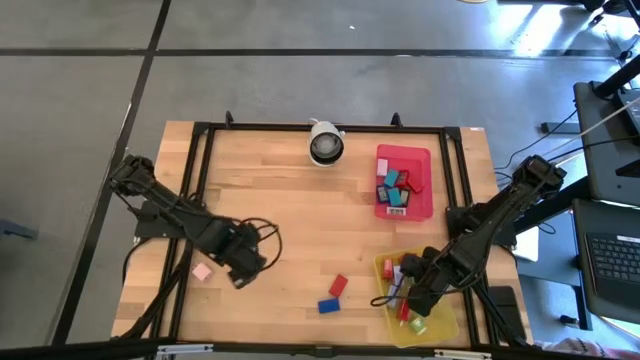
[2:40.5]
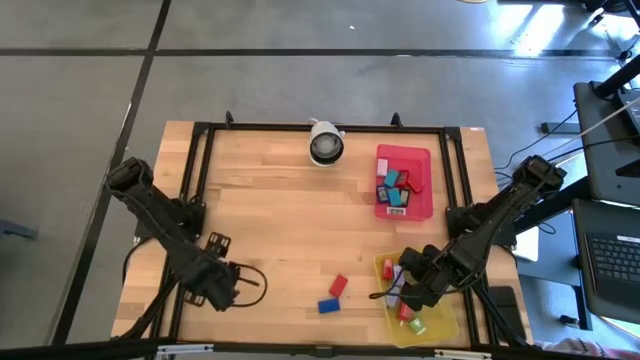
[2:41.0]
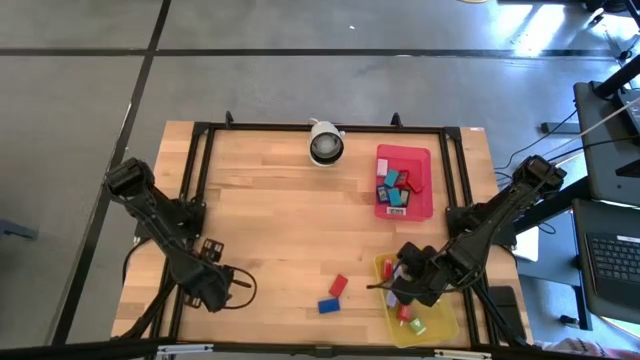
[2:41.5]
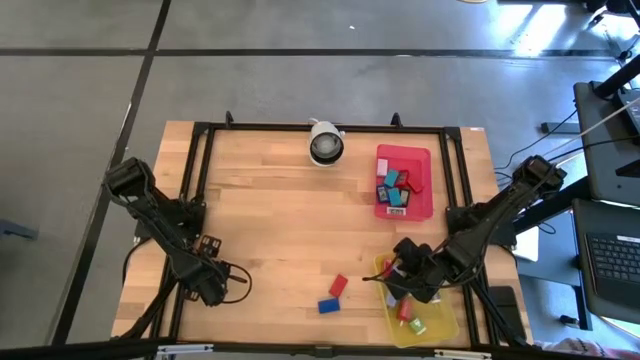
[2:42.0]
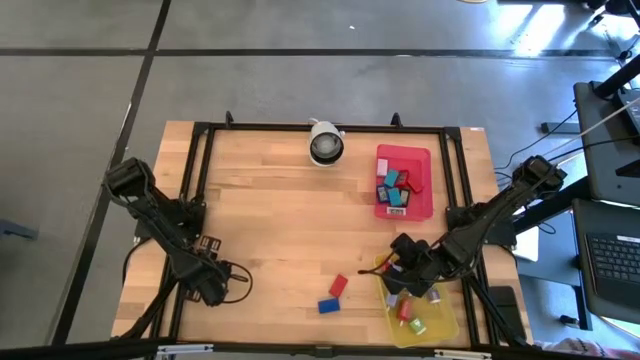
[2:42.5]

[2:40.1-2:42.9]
Task: Pick & Place Office items
Put the white charger adapter into the yellow bin

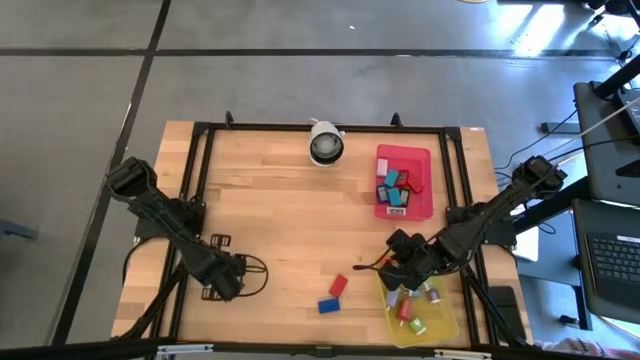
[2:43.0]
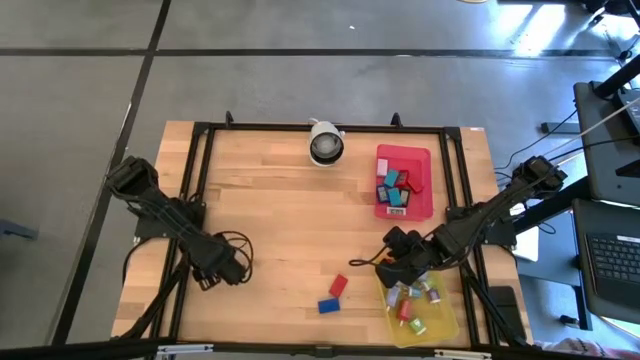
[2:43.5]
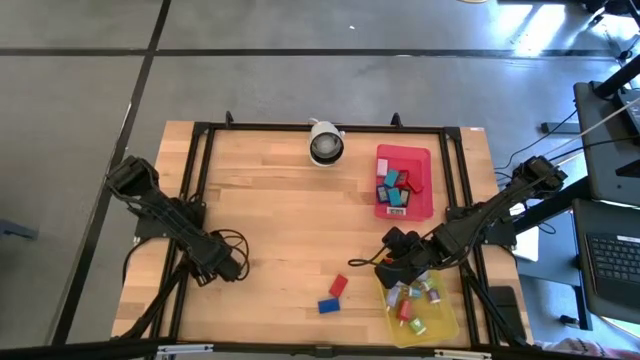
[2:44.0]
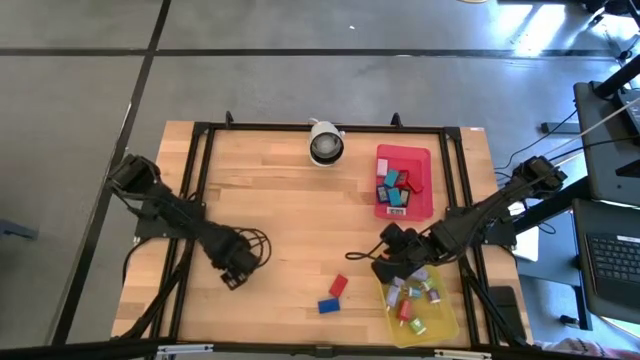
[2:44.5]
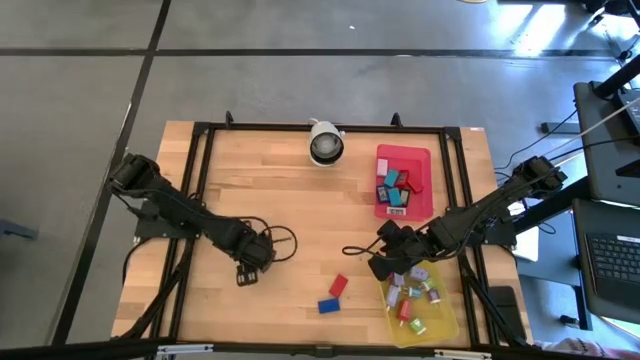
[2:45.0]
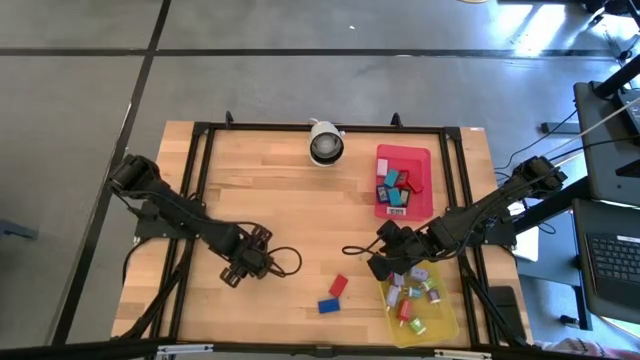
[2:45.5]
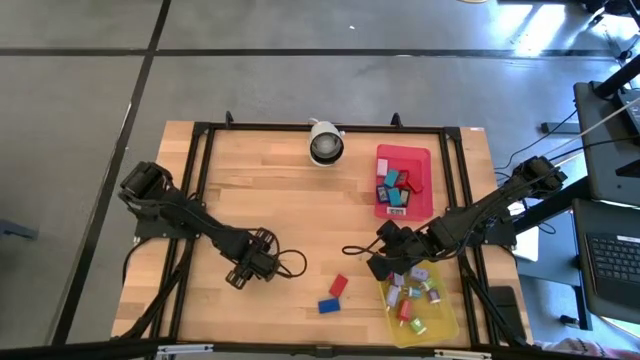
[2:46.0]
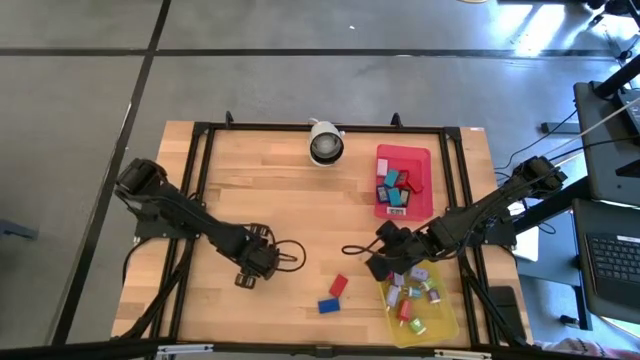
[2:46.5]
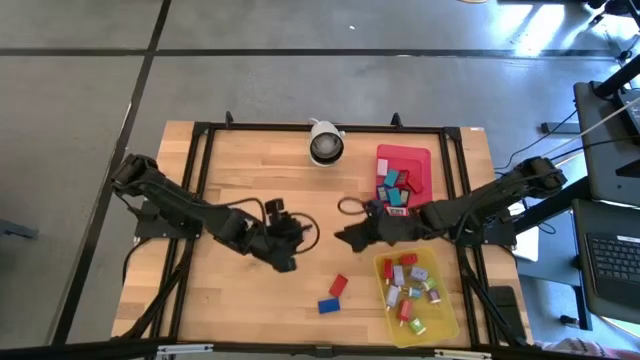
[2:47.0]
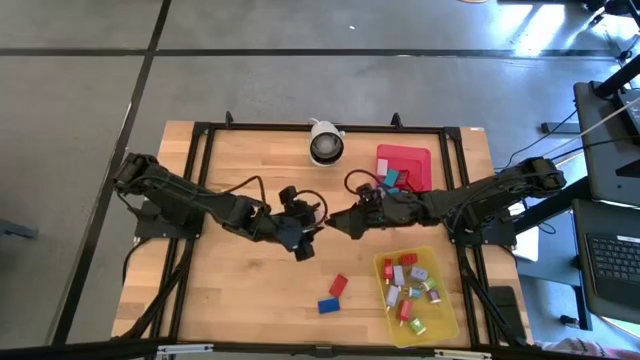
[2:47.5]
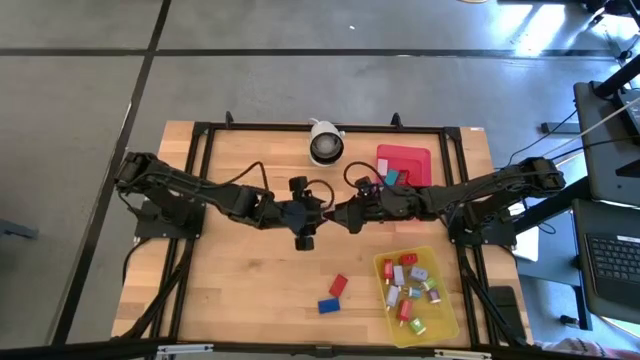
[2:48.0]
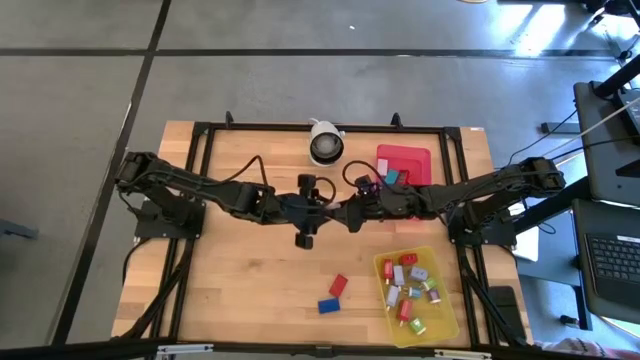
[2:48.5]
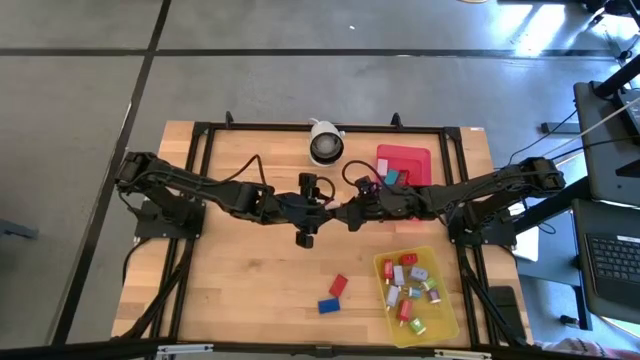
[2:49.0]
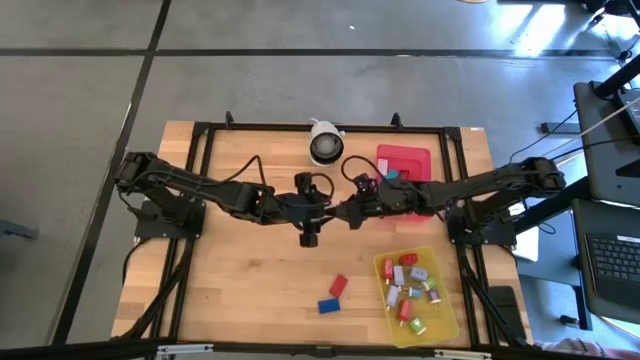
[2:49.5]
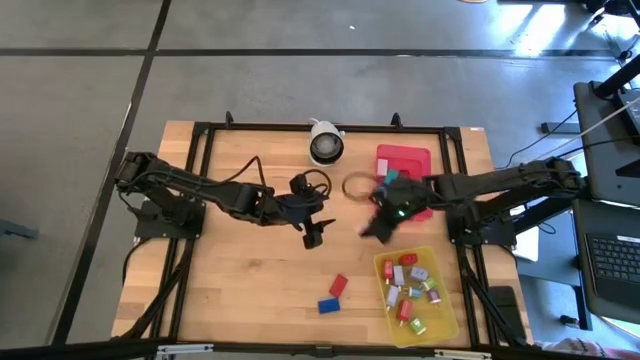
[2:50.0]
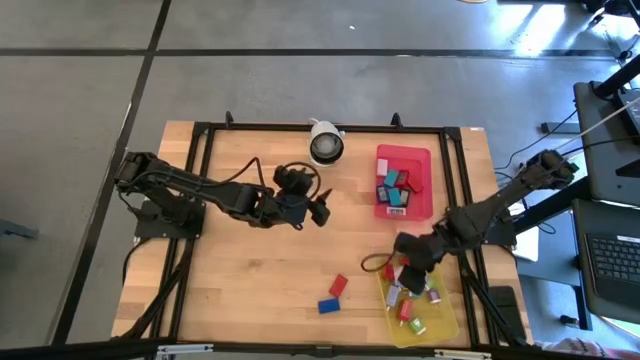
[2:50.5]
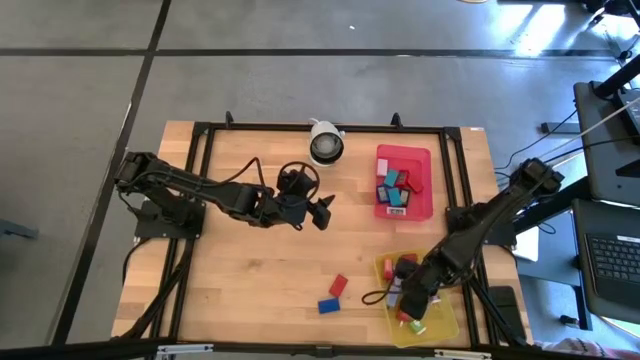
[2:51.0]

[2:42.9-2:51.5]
Put the white charger adapter into the yellow bin

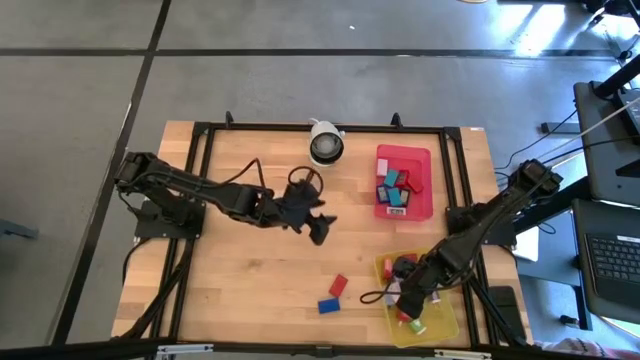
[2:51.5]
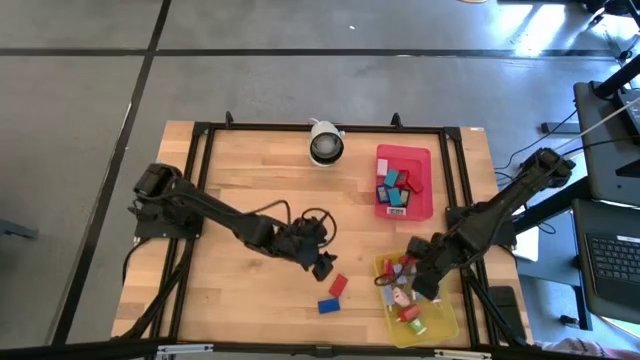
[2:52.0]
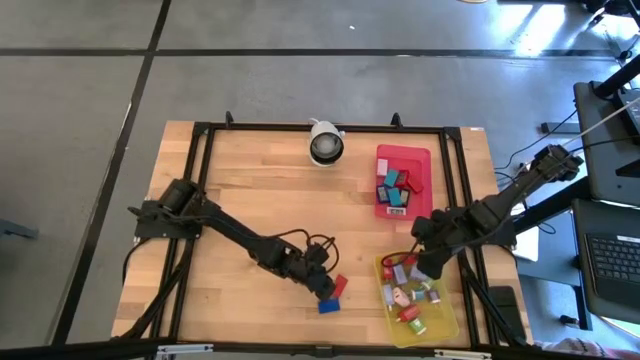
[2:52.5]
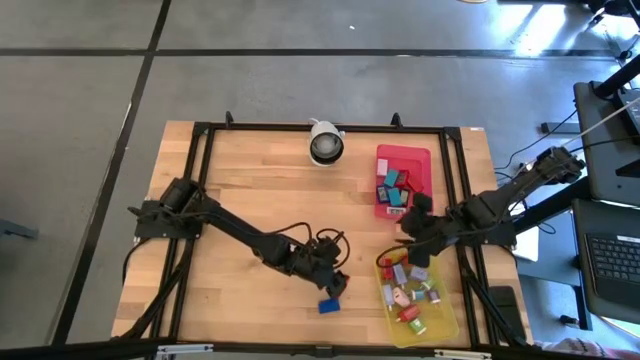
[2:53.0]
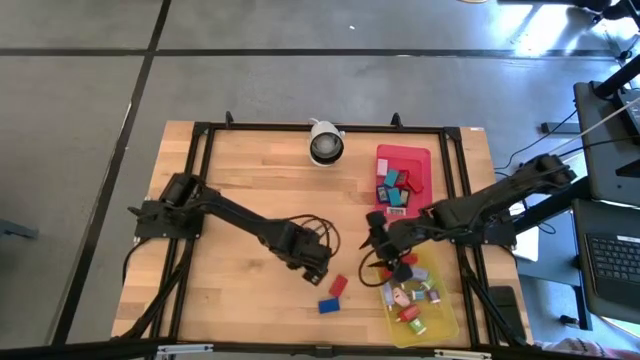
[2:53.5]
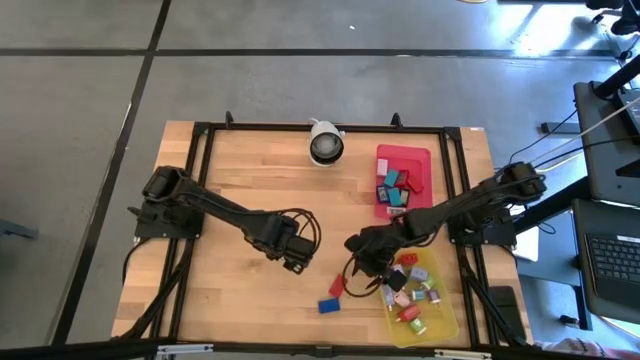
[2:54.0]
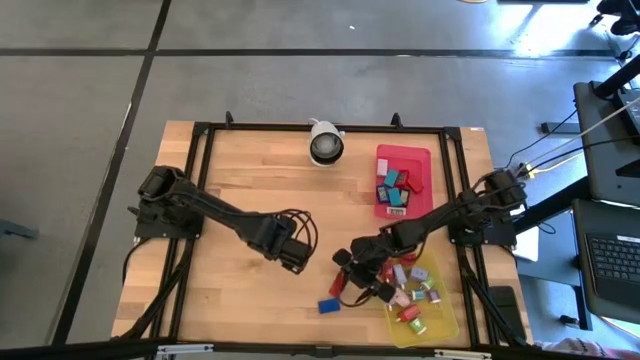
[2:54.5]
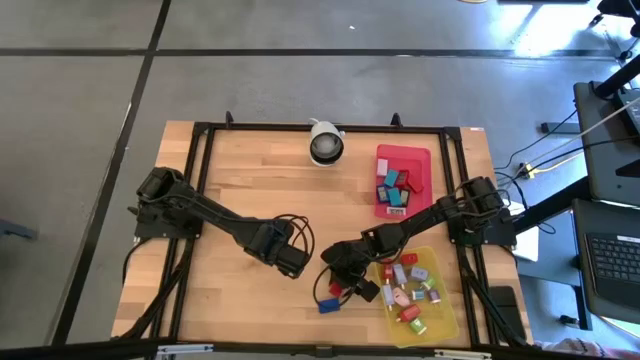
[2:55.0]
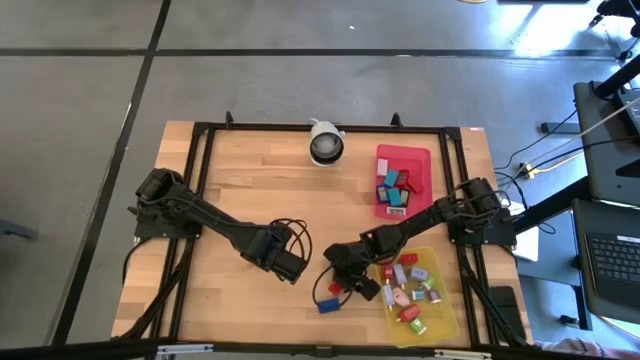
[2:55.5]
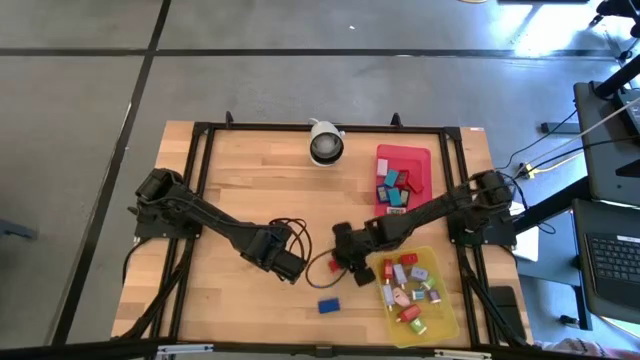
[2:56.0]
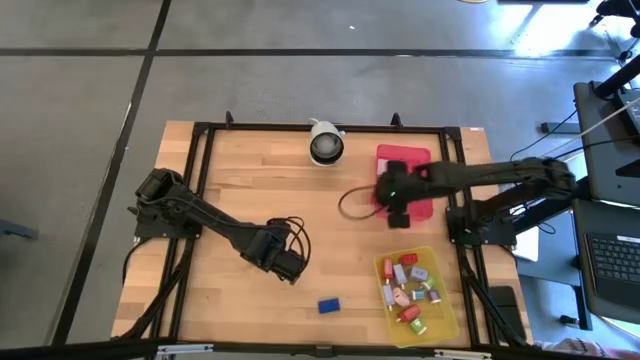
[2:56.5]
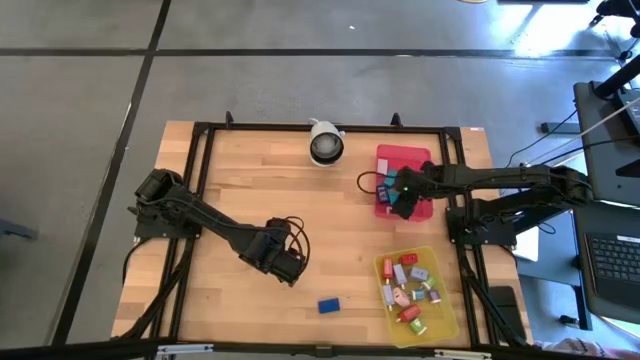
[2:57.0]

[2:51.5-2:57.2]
Put the red digital timer into the pink bin

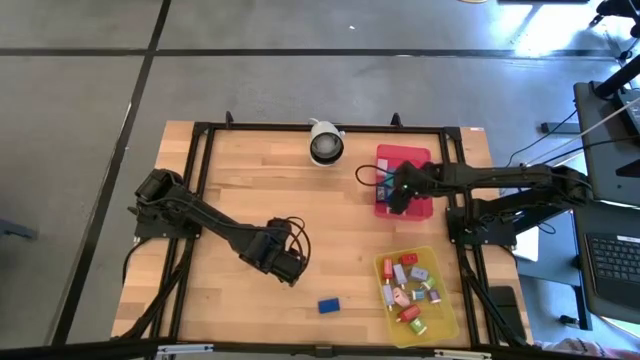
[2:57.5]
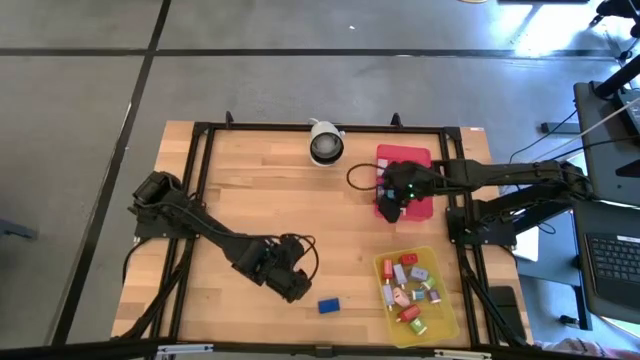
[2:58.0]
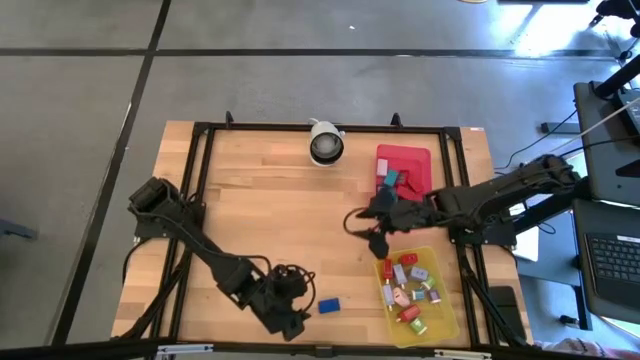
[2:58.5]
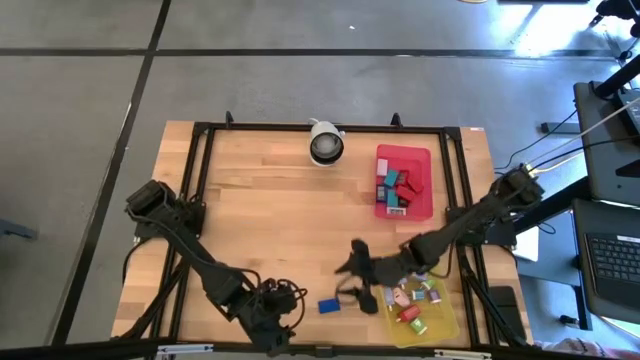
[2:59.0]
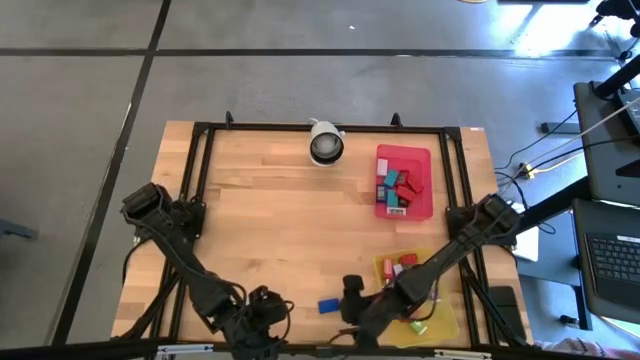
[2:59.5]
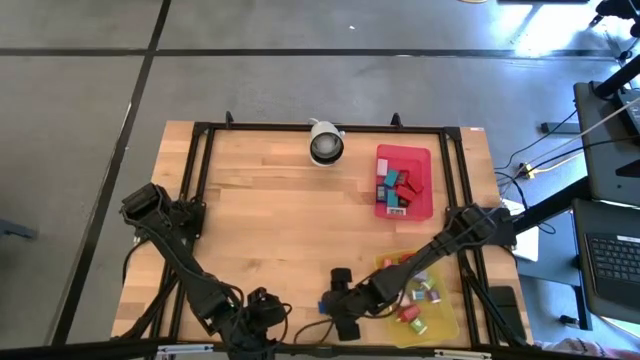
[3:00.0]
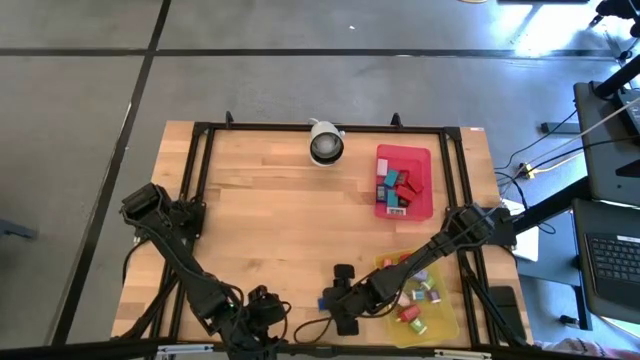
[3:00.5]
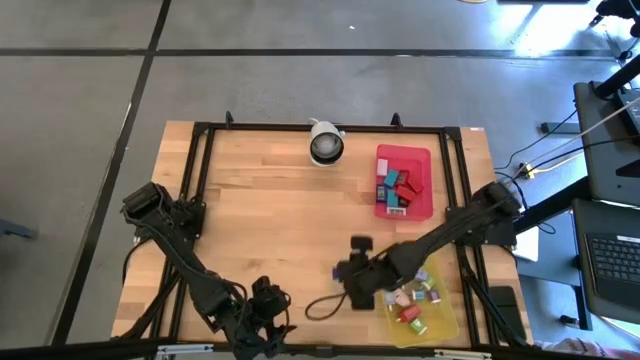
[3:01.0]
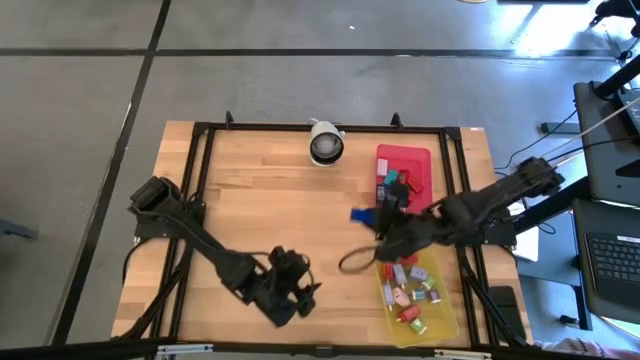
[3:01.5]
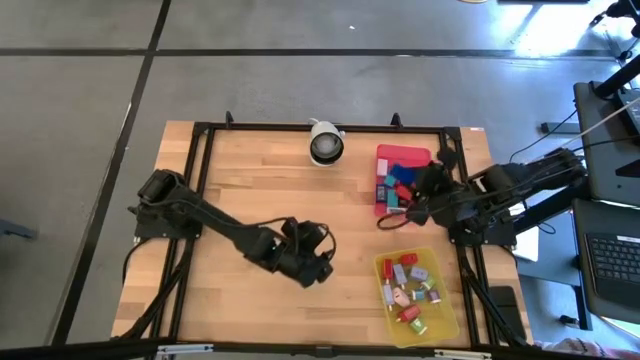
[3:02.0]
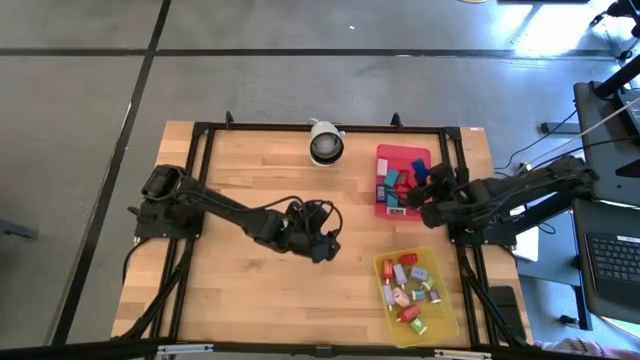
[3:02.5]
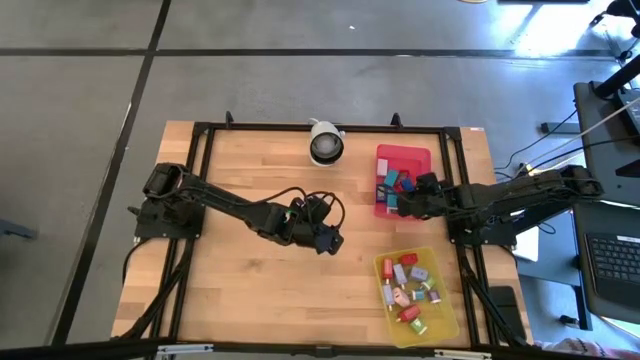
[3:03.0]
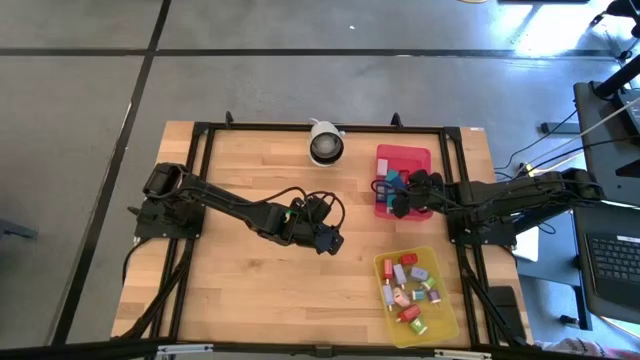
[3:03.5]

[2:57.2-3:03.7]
Put the blue digital timer into the pink bin
